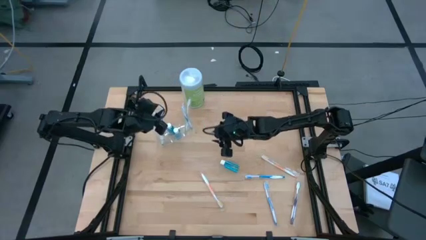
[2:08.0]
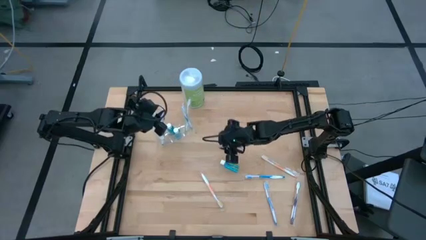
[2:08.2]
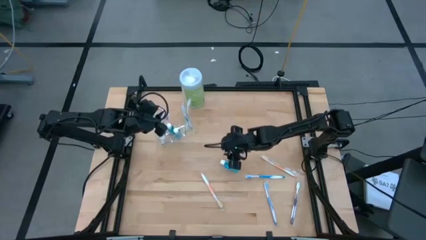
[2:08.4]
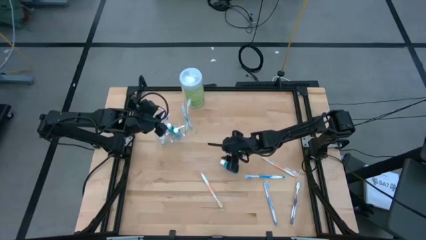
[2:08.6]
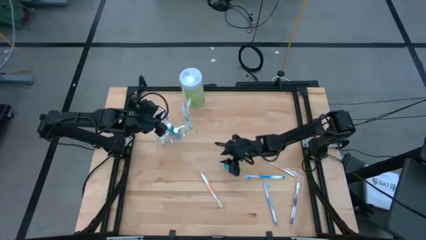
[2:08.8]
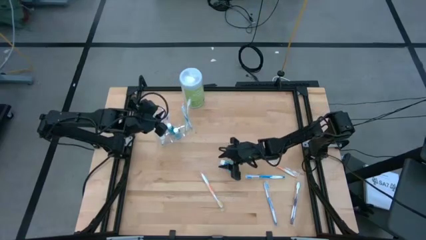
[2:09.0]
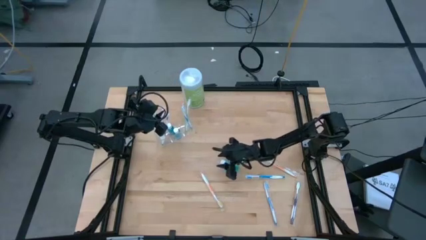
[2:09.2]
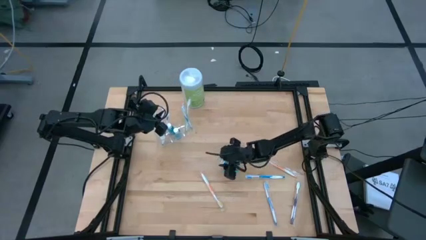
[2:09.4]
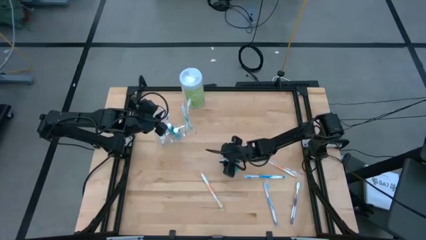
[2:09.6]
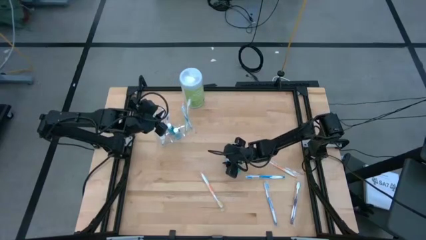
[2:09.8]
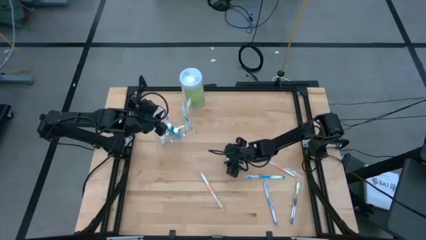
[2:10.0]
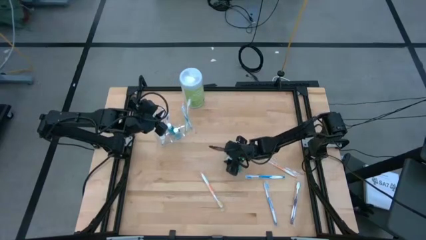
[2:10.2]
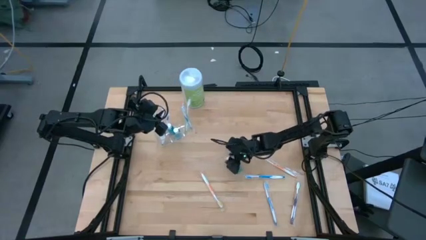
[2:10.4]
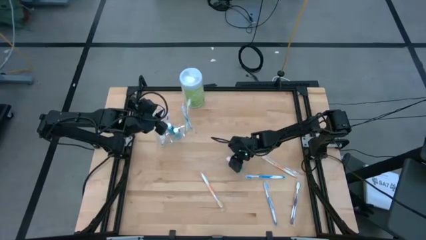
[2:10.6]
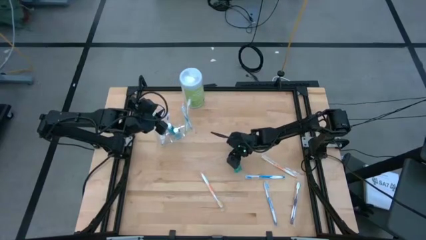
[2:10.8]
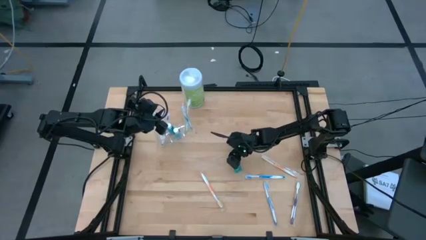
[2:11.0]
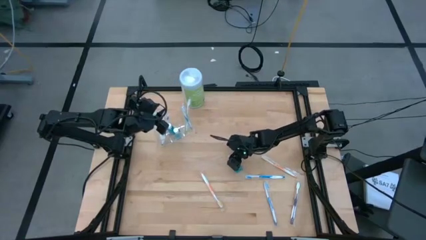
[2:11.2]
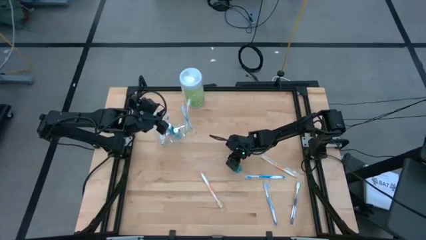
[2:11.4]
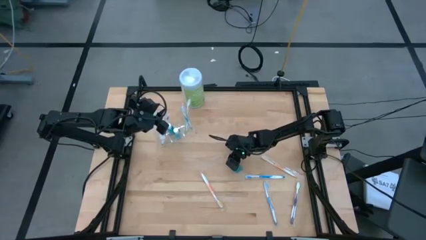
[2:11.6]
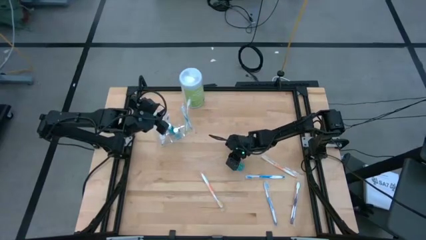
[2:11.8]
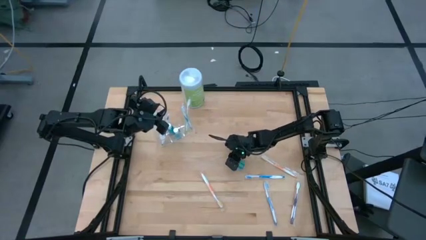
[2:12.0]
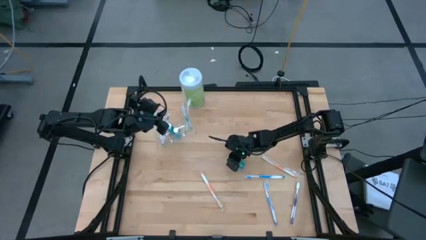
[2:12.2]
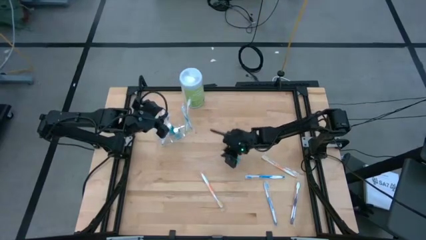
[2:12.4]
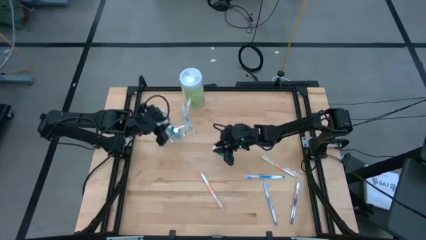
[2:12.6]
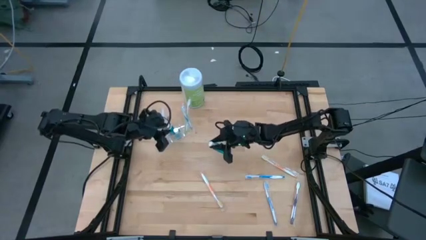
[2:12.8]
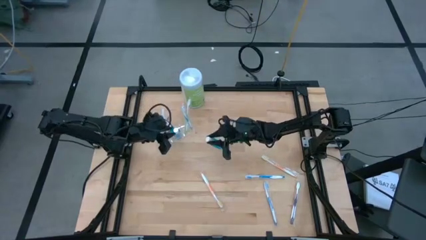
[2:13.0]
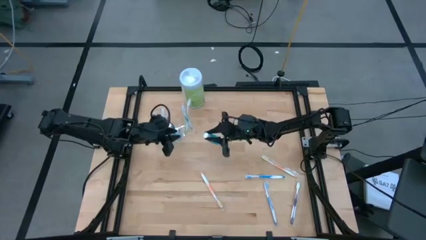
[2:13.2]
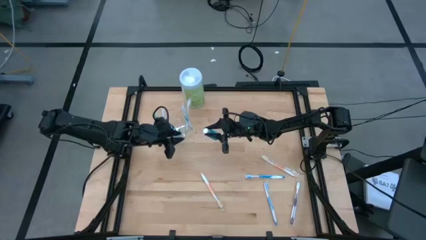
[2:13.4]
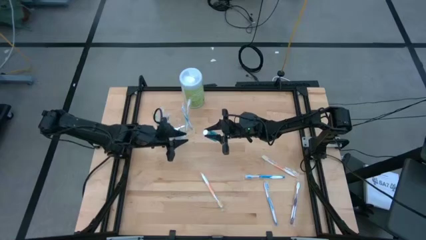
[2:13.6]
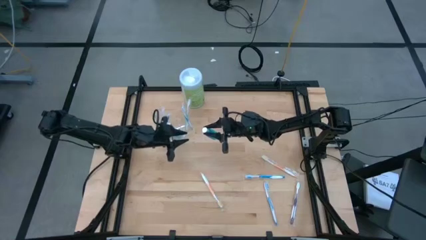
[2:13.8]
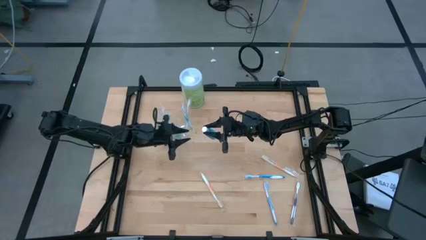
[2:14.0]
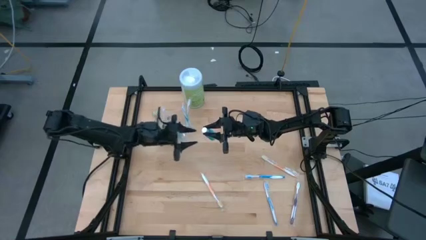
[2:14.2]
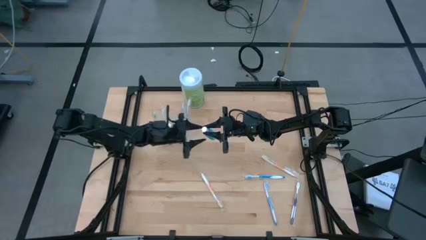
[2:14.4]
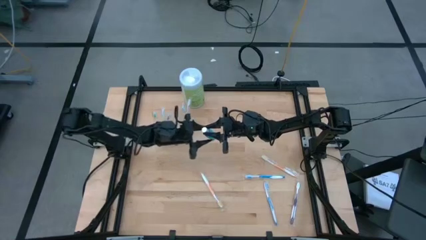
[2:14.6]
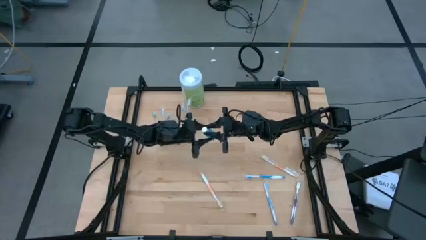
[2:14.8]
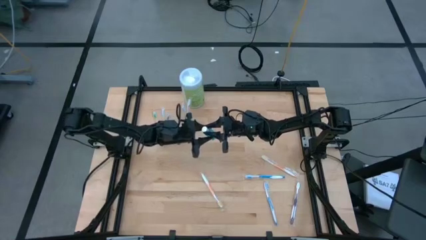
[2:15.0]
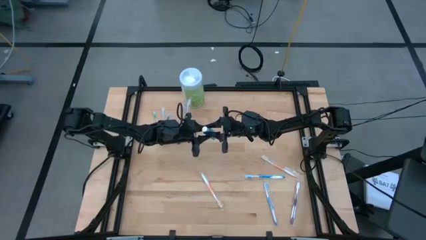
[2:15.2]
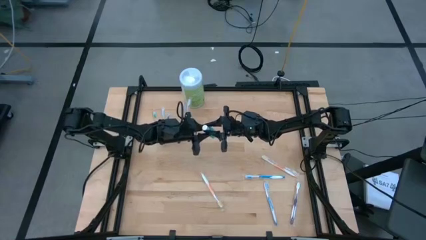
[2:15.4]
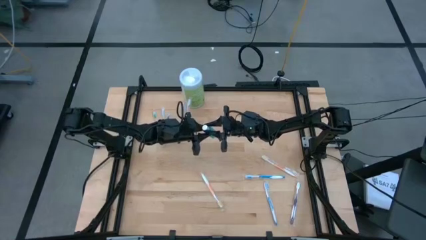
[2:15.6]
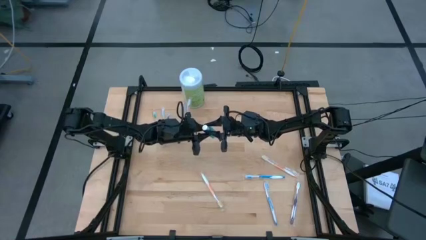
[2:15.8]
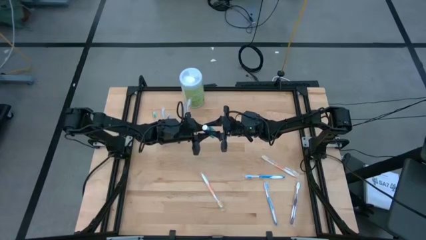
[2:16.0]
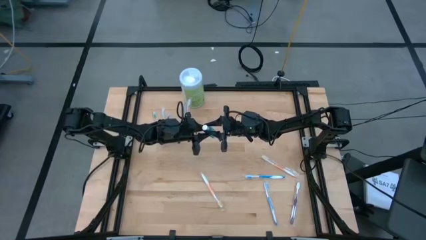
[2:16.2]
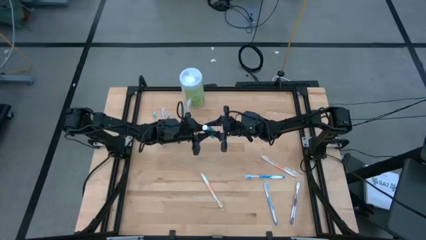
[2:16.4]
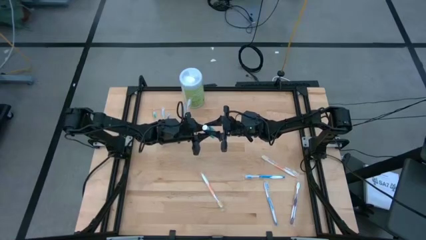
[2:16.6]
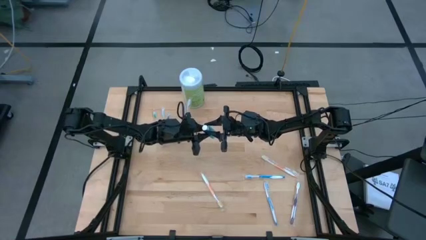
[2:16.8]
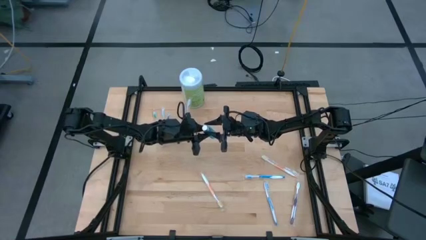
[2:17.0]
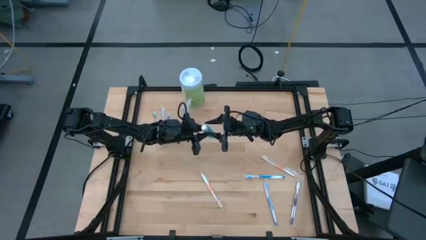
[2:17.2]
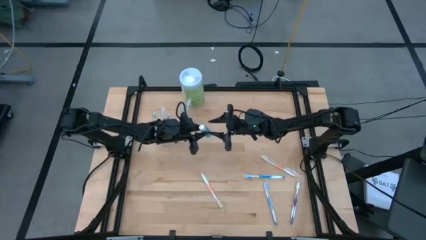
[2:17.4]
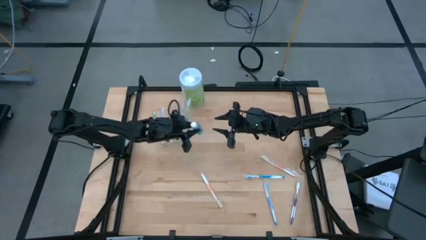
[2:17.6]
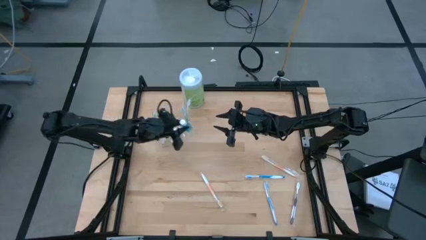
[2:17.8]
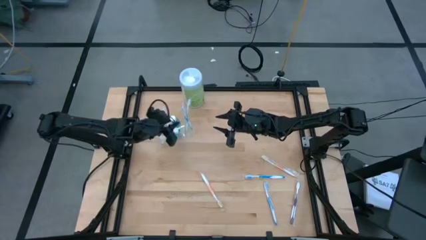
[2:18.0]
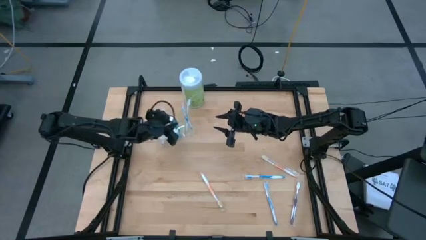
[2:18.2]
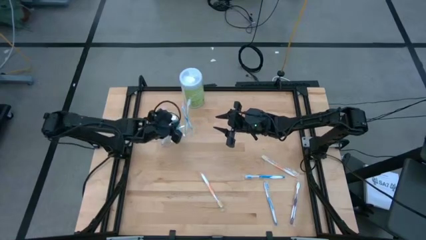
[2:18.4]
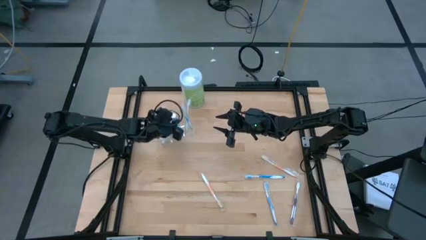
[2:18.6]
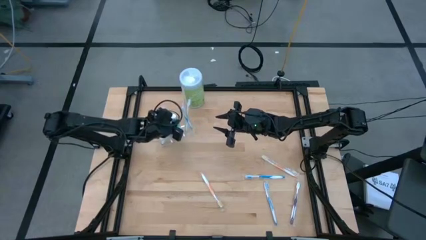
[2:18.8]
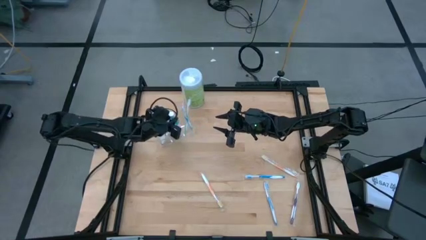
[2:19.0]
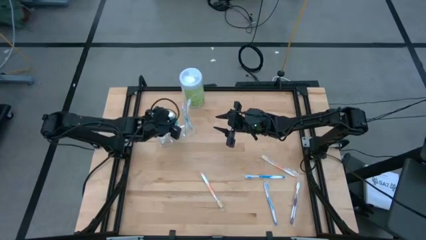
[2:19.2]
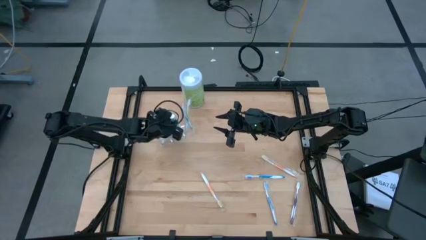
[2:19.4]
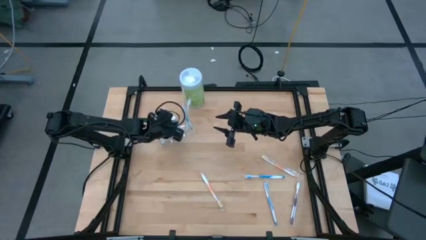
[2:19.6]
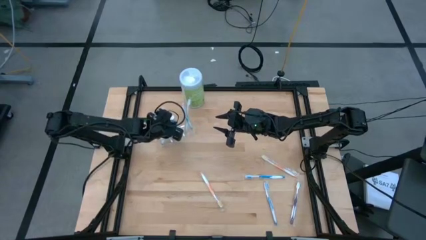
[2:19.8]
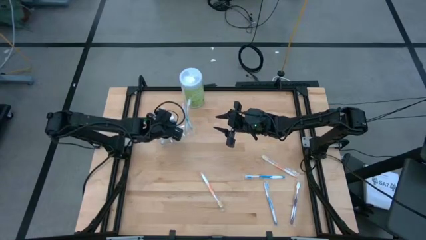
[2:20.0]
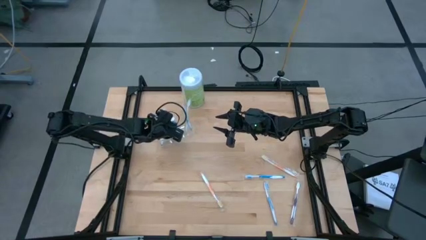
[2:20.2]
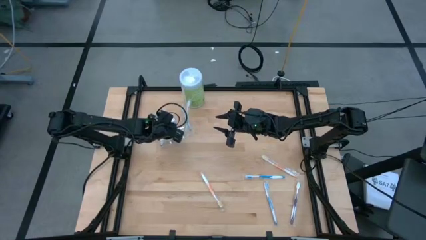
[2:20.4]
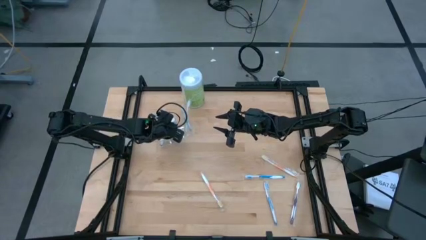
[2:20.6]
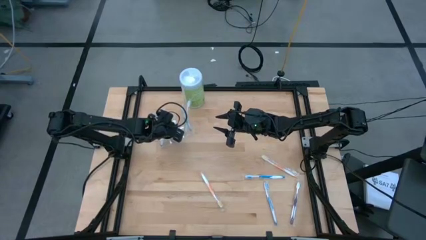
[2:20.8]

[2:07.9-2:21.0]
Task: Pick & Place toothbrushing station
Put the blue mouthwash into the transparent organizer

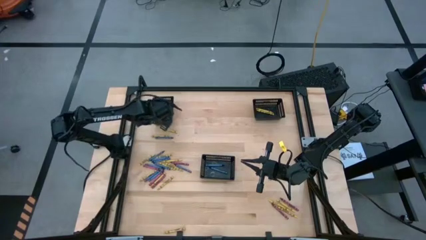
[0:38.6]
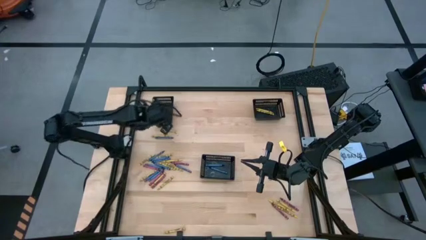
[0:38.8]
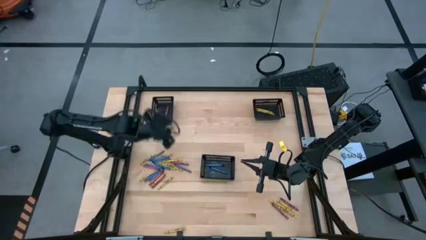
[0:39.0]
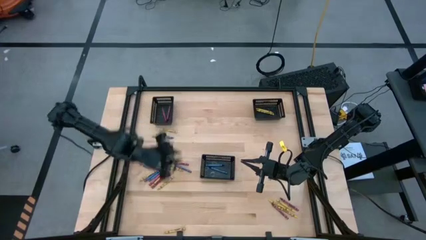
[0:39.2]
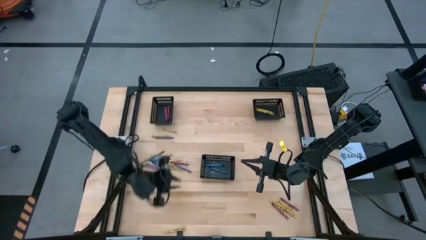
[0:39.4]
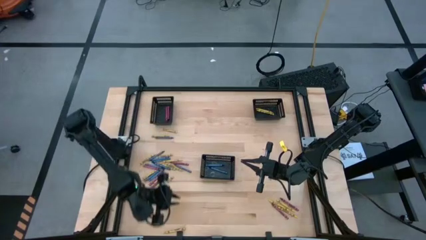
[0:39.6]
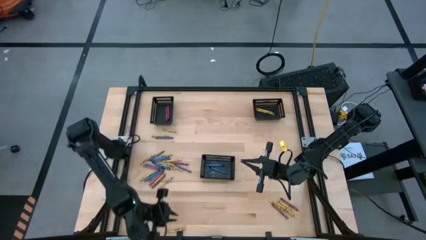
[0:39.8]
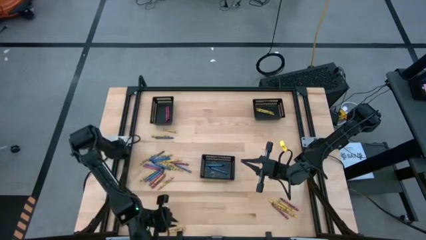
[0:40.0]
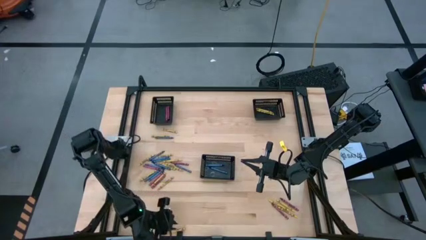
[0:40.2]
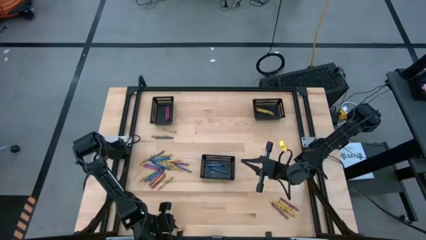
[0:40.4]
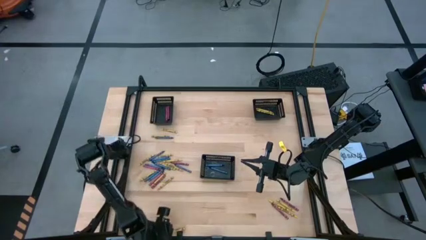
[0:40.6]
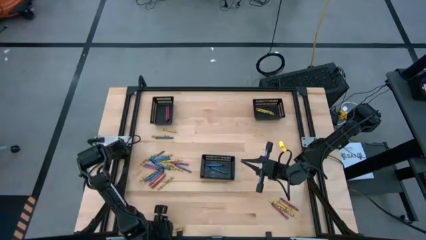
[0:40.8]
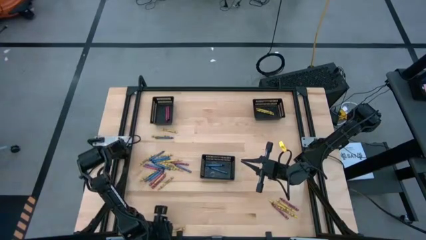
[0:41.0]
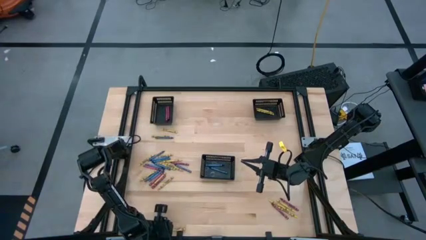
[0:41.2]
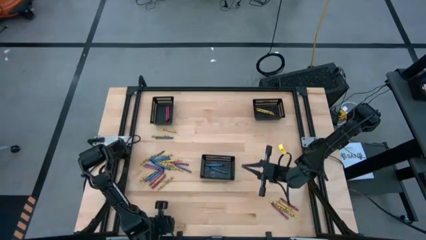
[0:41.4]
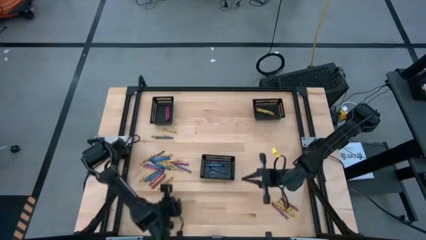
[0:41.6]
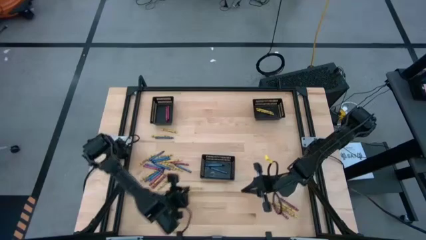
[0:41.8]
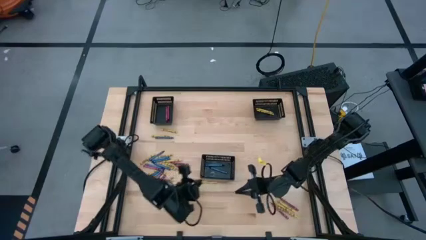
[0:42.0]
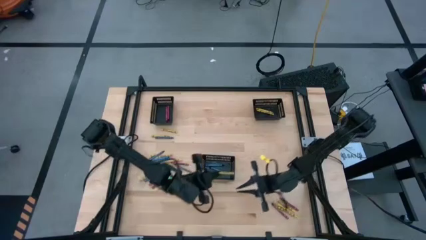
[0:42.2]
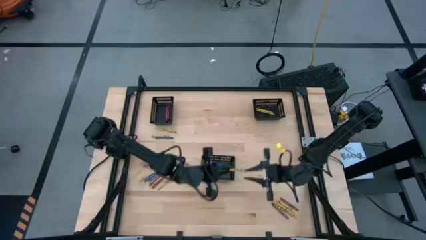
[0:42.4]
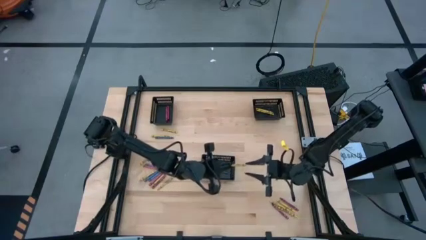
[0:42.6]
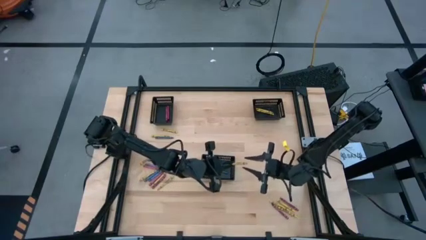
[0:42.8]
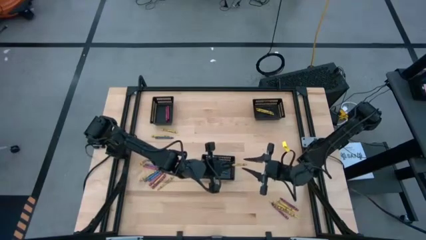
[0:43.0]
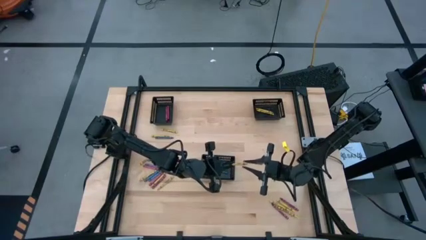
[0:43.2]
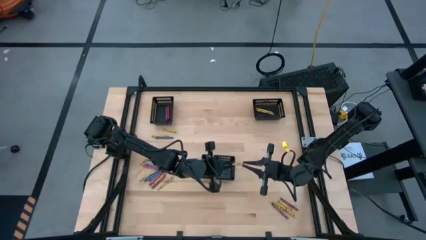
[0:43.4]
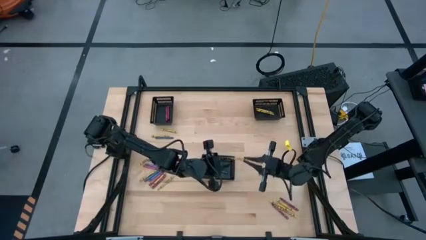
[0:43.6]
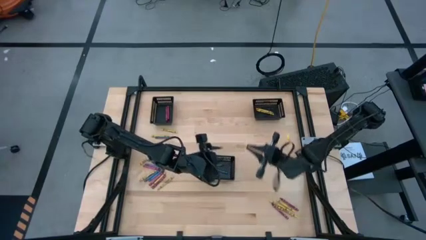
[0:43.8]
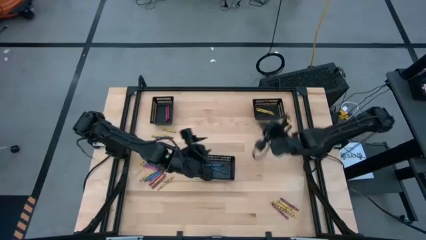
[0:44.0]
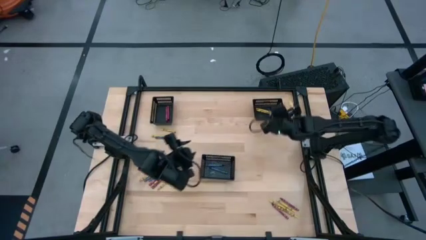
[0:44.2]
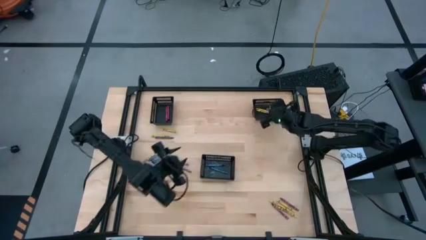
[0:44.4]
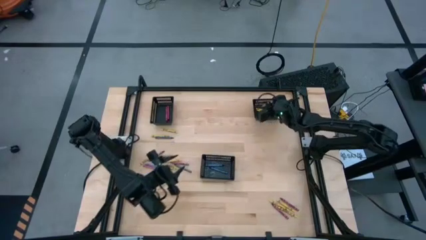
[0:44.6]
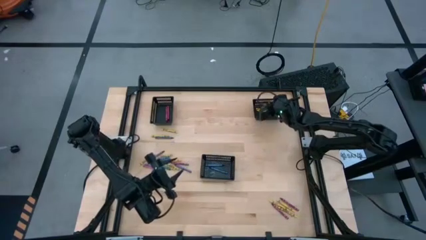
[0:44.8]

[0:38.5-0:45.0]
Task: Sort crayons
Put the yellow crayon into the top right black bin
